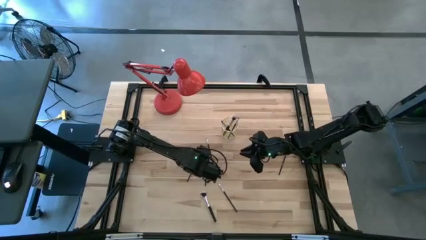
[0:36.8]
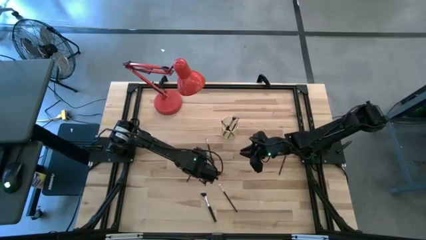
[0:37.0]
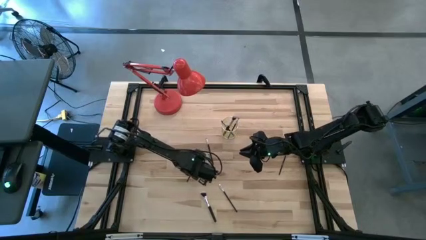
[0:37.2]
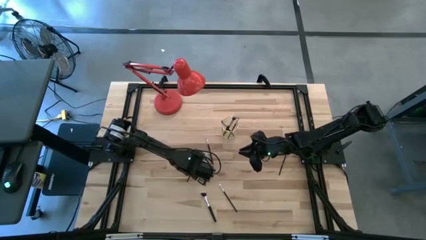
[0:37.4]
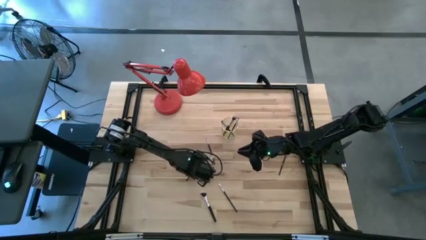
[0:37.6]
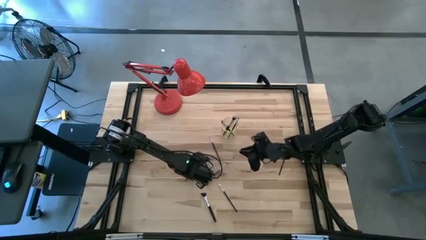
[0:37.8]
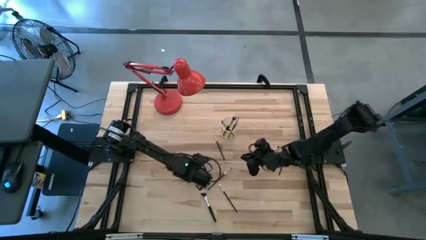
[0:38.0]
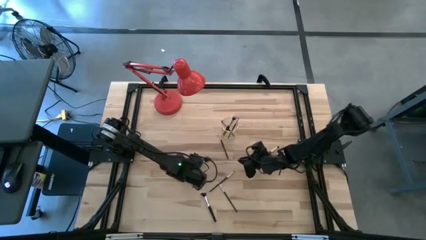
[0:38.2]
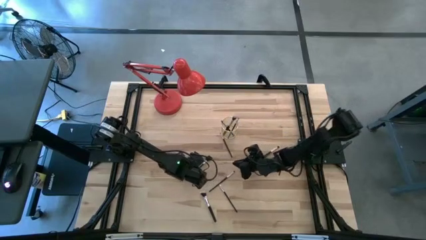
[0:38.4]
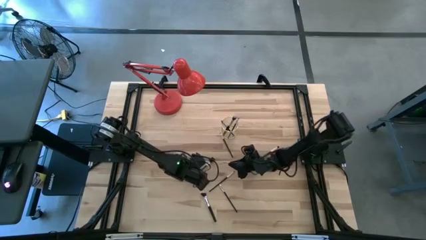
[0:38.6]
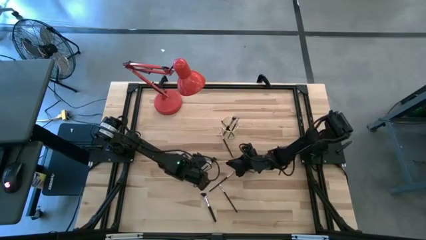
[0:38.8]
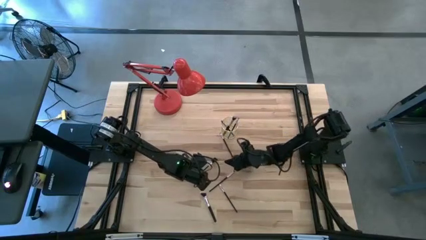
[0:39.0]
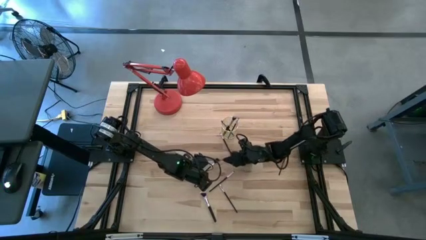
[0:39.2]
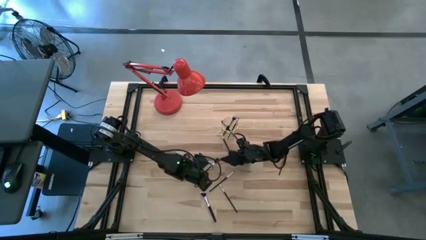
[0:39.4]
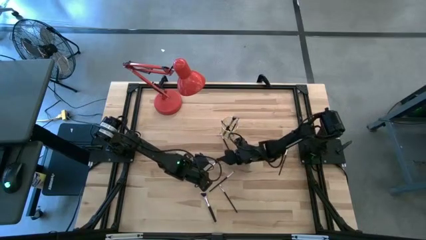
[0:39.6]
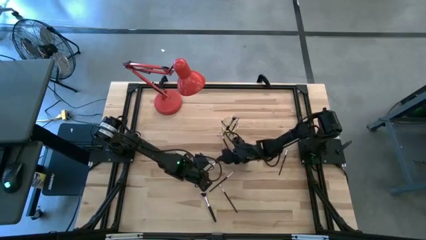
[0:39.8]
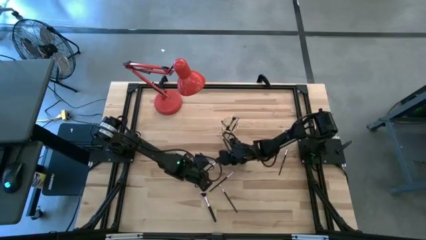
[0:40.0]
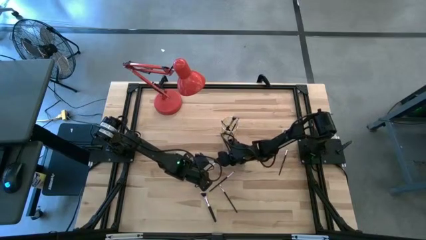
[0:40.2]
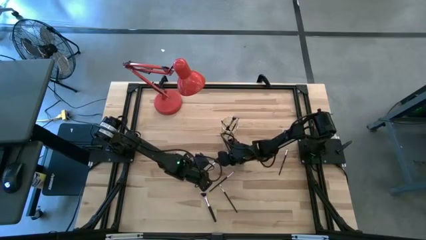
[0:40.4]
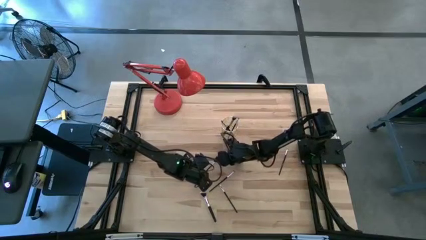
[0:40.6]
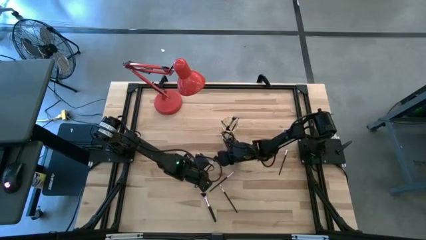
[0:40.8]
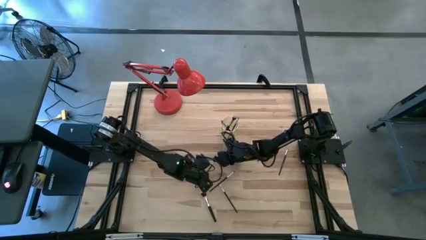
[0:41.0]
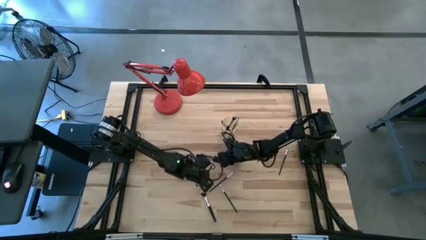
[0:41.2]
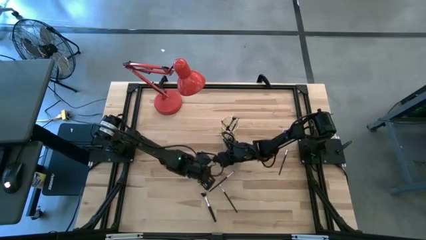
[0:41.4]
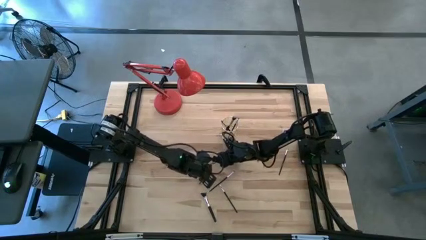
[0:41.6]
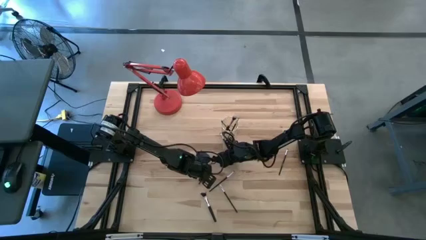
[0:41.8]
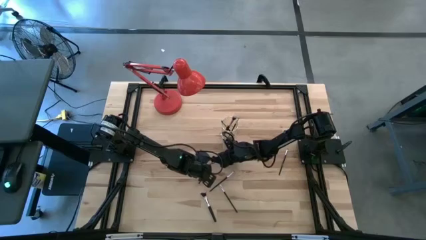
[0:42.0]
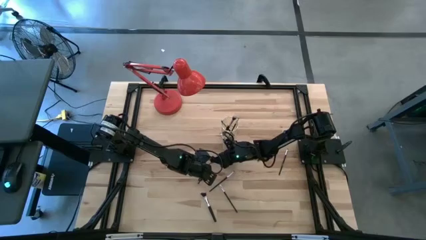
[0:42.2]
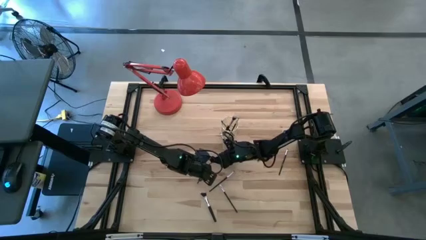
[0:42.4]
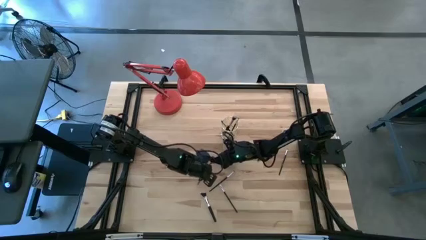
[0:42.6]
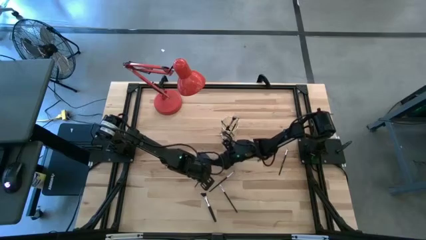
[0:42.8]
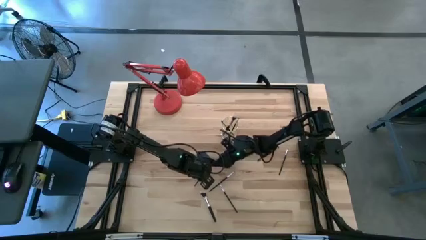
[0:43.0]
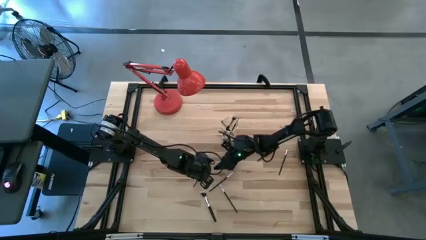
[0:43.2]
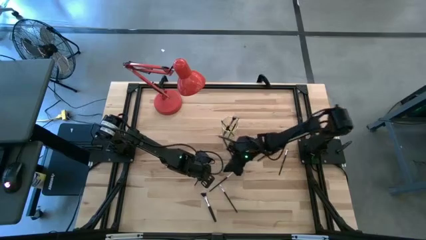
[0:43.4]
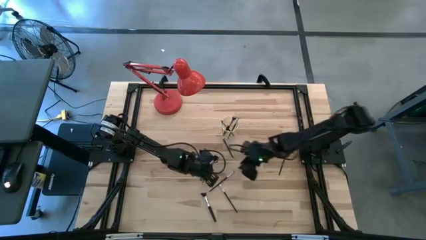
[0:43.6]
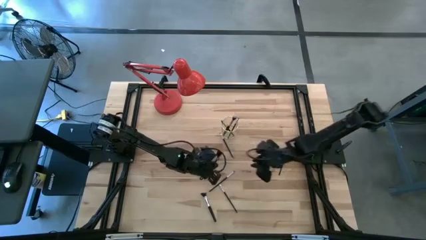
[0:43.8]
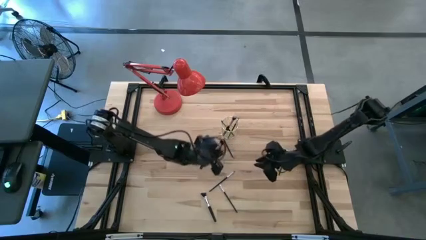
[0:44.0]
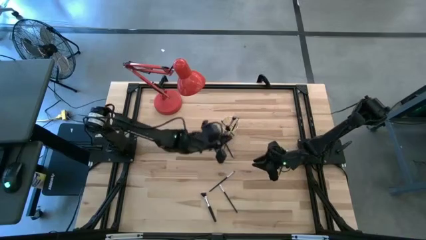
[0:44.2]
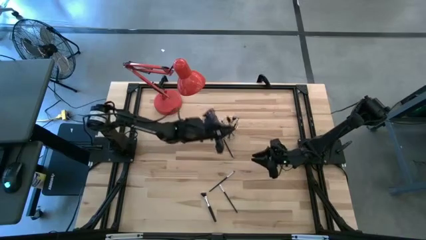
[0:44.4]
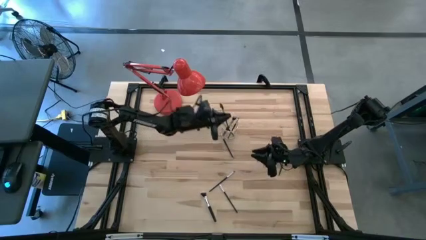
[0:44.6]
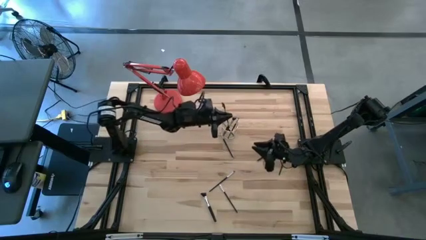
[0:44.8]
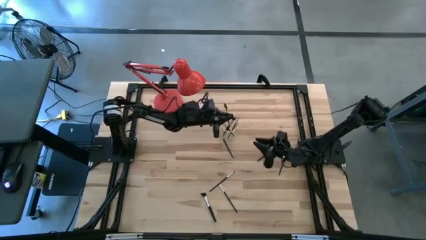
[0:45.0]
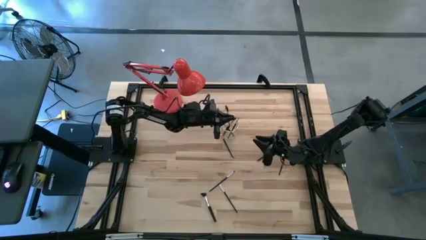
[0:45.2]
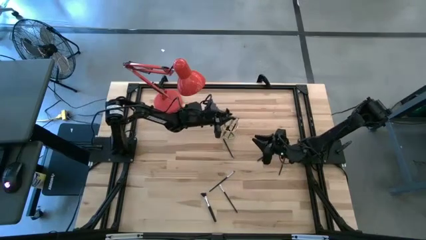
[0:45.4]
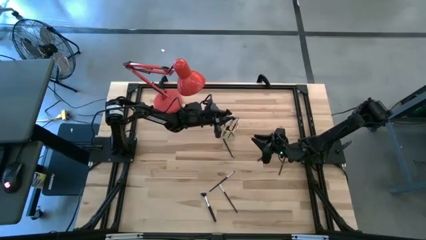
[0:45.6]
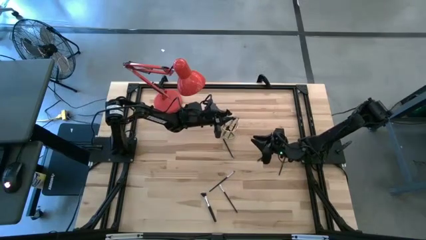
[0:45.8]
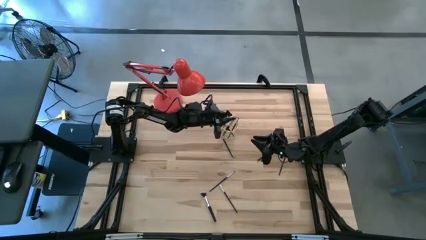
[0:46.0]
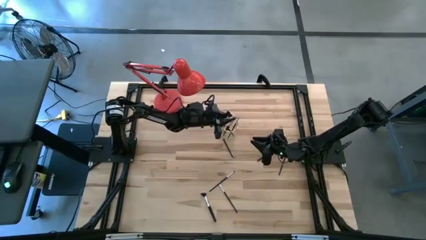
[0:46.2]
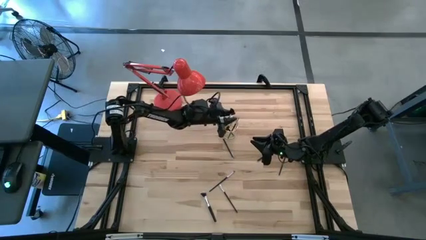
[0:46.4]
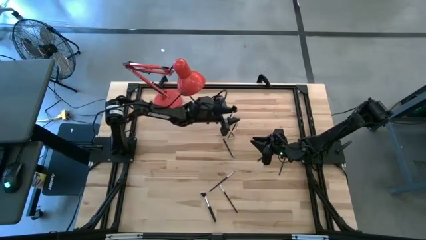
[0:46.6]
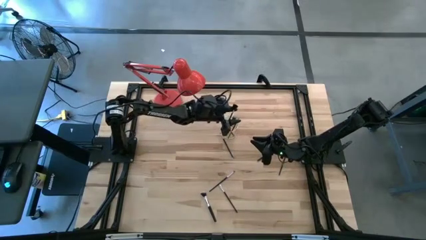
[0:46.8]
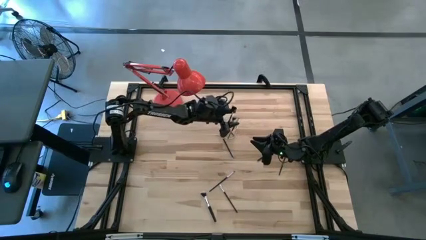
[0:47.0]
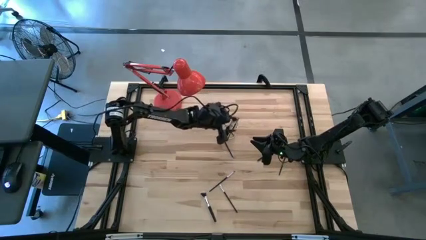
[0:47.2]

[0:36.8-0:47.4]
Task: Put items in baskets/containers
Put the black lash brush into the yellow container

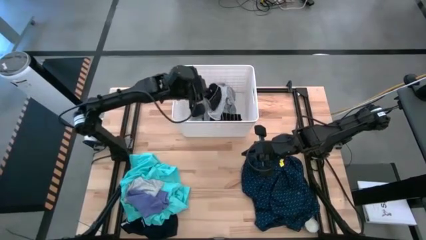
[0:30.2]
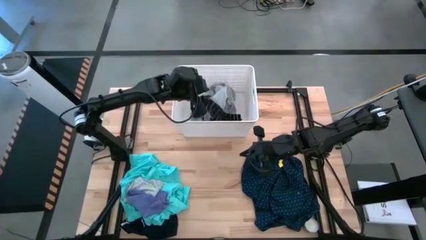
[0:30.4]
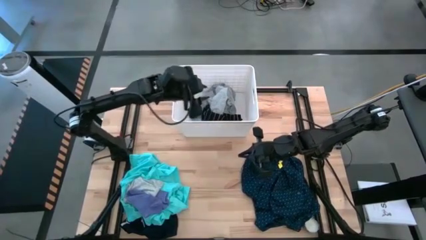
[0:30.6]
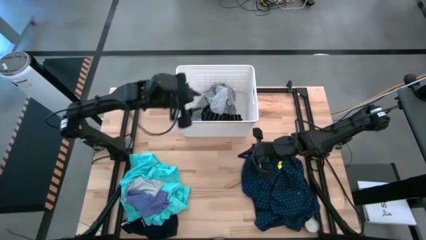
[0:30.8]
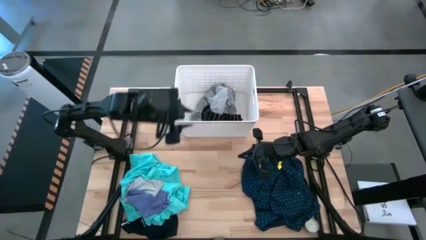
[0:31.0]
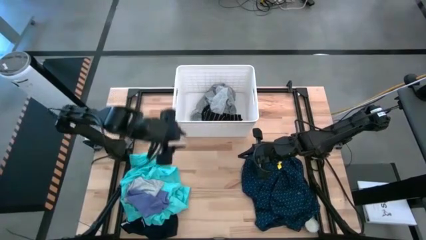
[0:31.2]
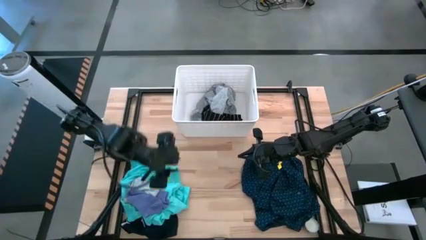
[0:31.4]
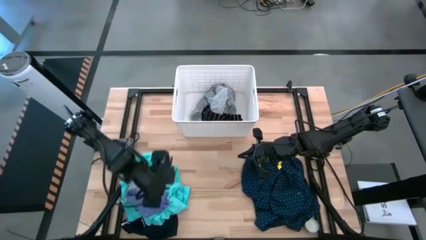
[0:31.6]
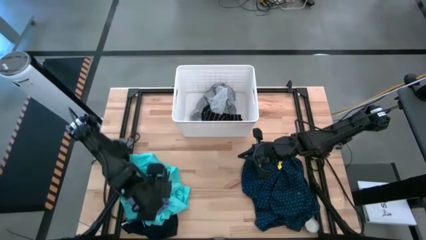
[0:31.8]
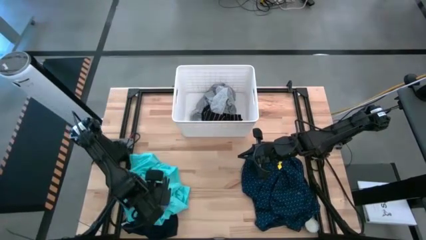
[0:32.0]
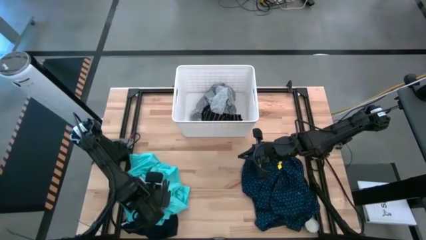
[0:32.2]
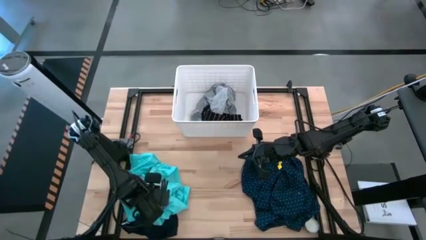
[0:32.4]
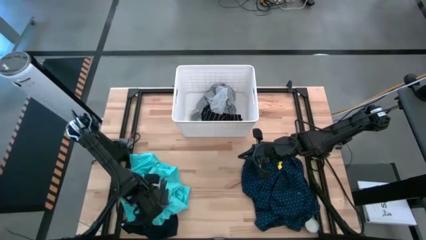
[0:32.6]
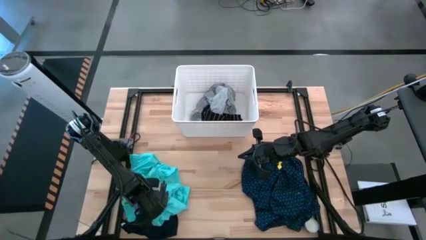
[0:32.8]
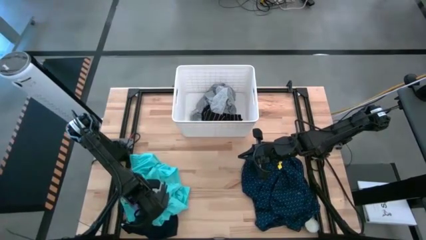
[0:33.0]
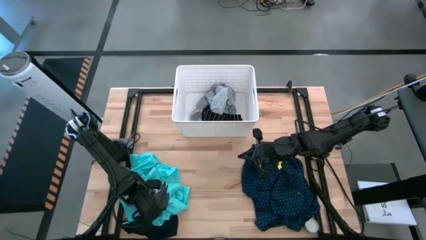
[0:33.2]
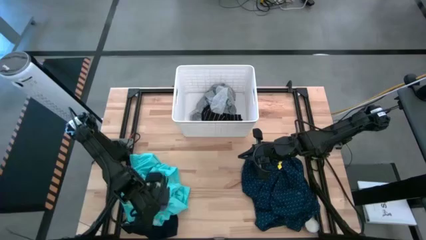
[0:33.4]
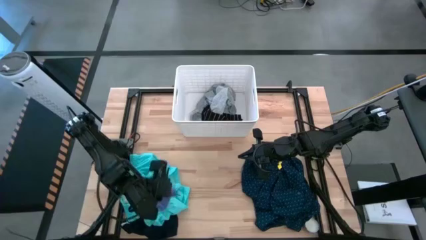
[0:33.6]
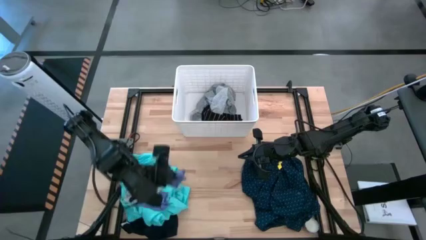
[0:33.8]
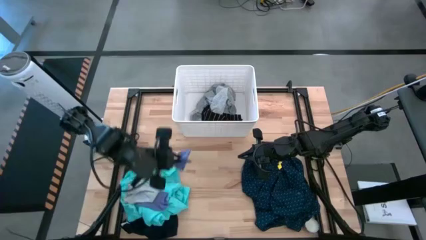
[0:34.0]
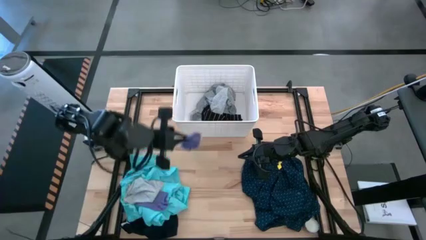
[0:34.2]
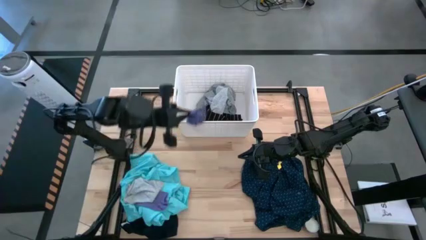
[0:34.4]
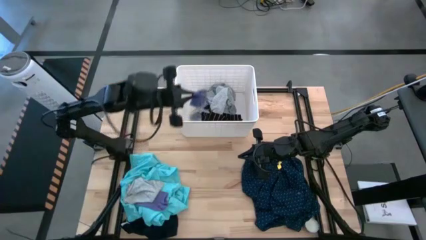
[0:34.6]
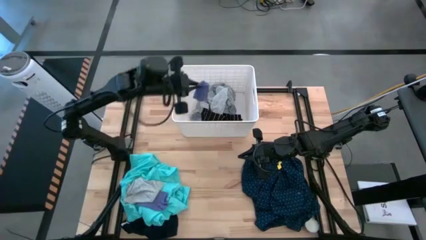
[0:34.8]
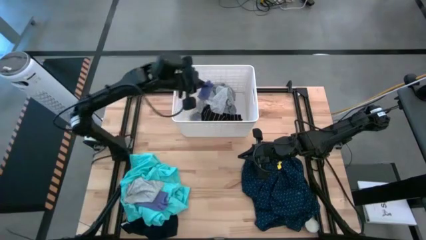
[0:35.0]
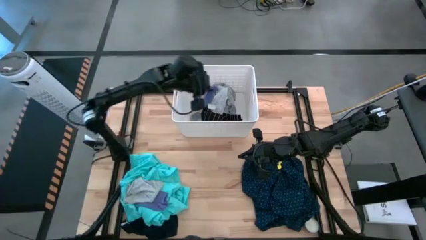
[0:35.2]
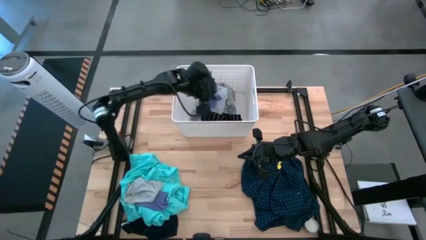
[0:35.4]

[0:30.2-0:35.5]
Task: Sort clothes
Put the purple sock into the white laundry bin
